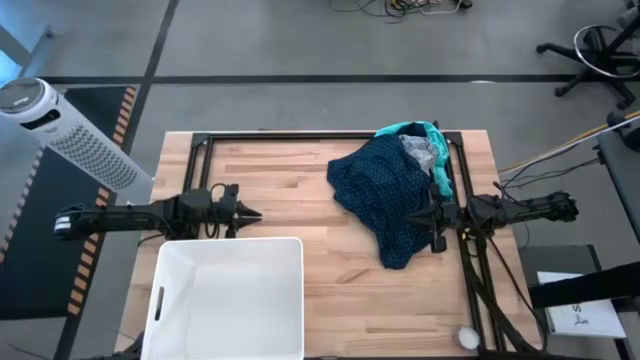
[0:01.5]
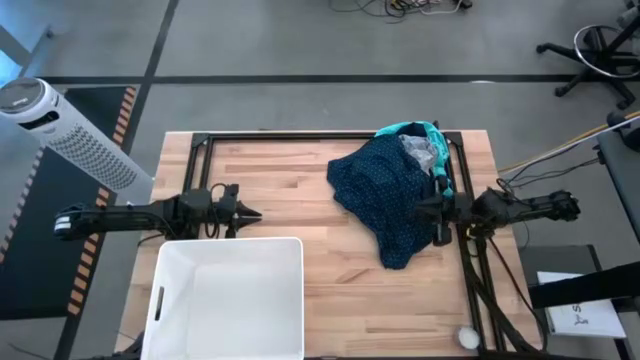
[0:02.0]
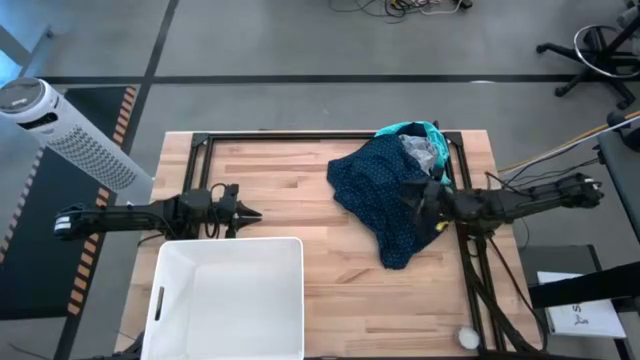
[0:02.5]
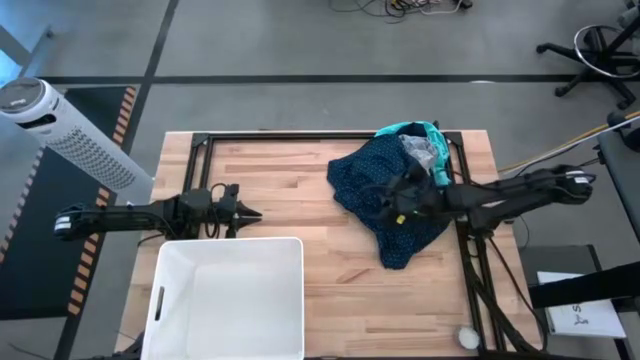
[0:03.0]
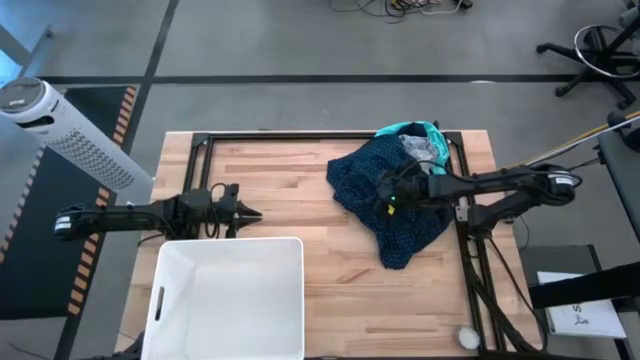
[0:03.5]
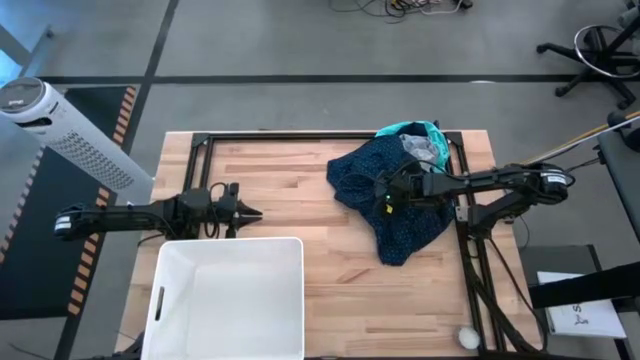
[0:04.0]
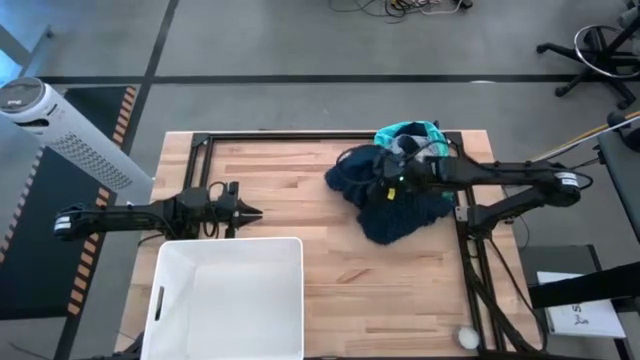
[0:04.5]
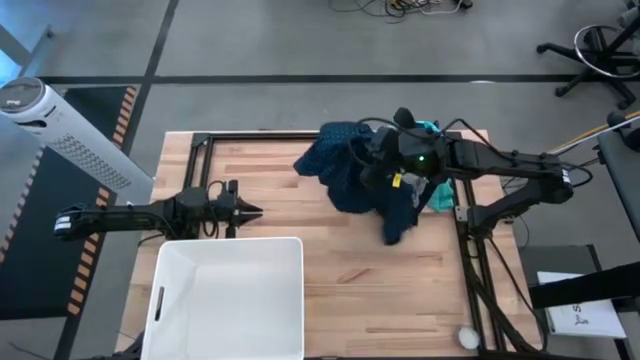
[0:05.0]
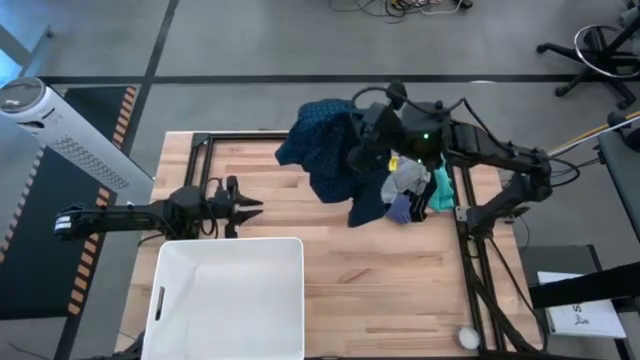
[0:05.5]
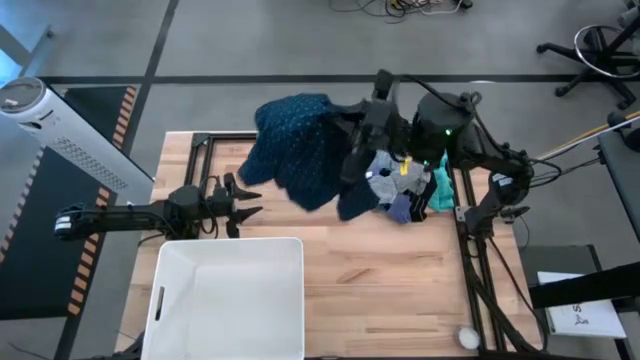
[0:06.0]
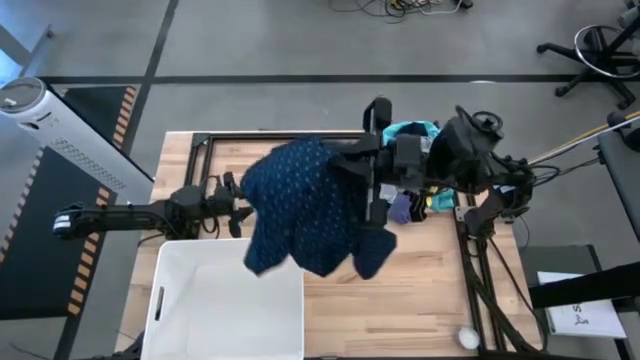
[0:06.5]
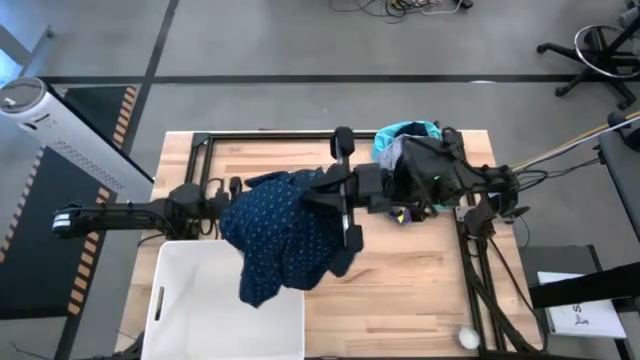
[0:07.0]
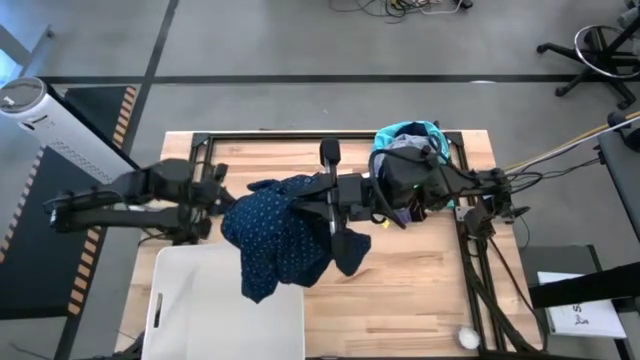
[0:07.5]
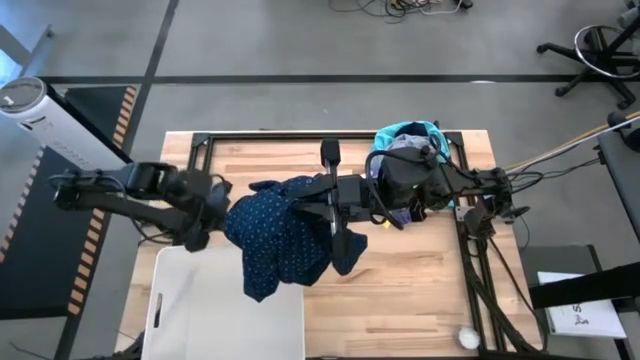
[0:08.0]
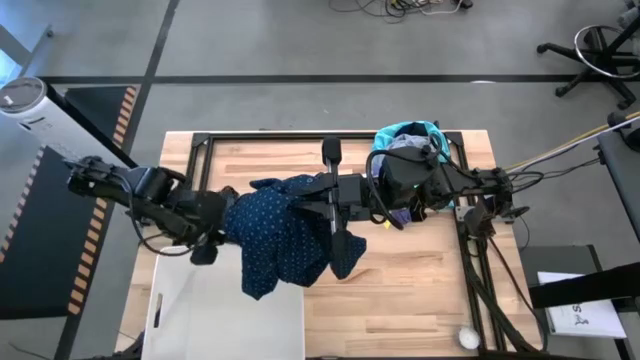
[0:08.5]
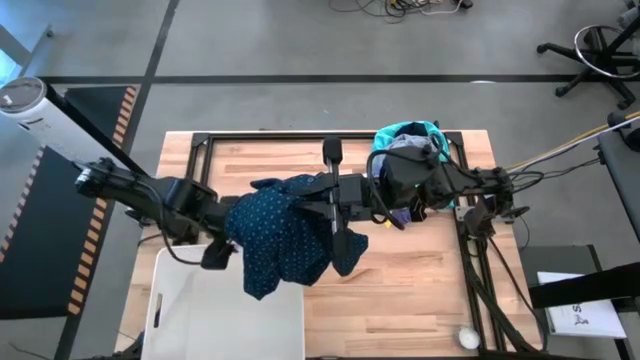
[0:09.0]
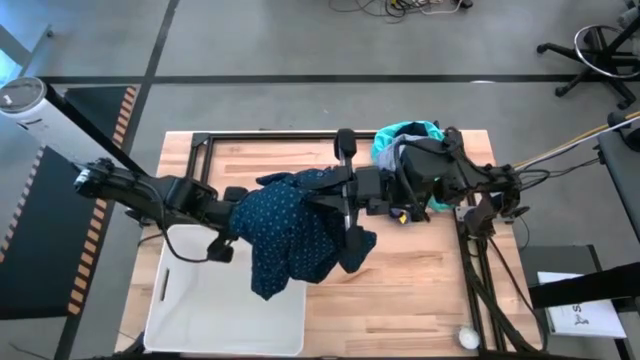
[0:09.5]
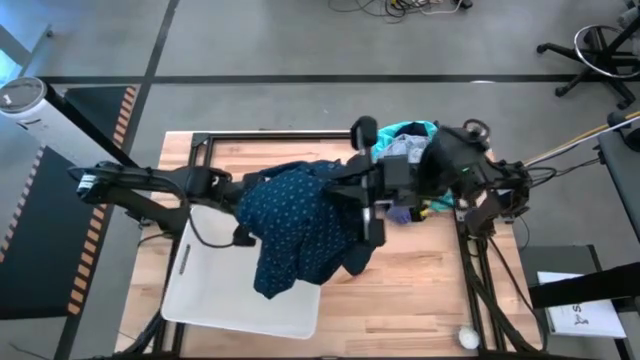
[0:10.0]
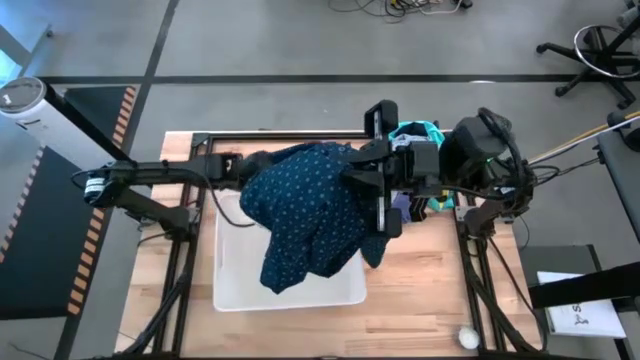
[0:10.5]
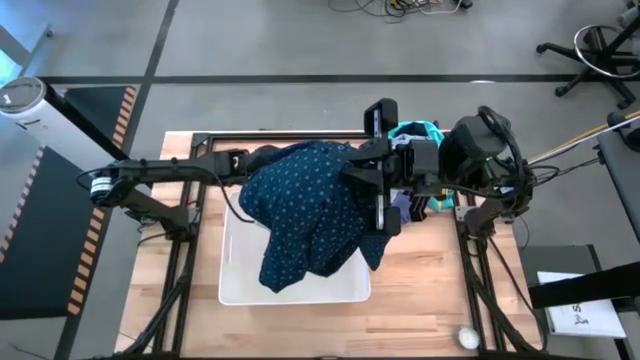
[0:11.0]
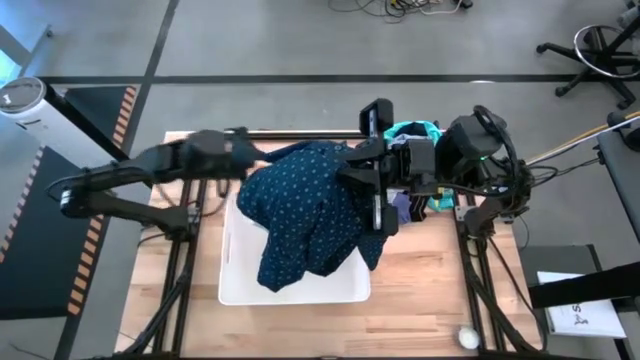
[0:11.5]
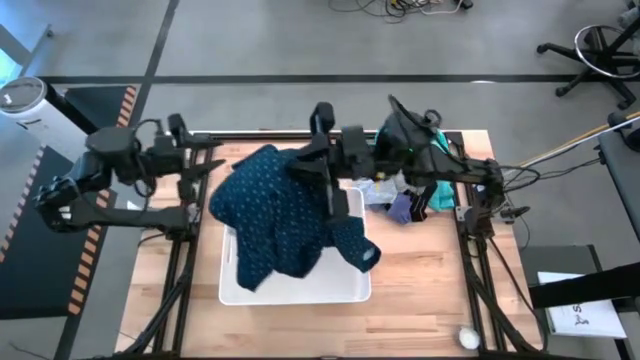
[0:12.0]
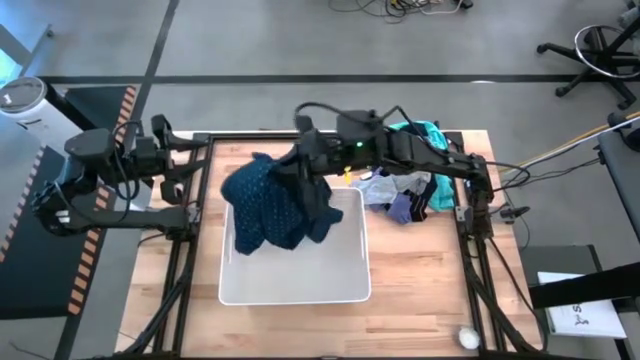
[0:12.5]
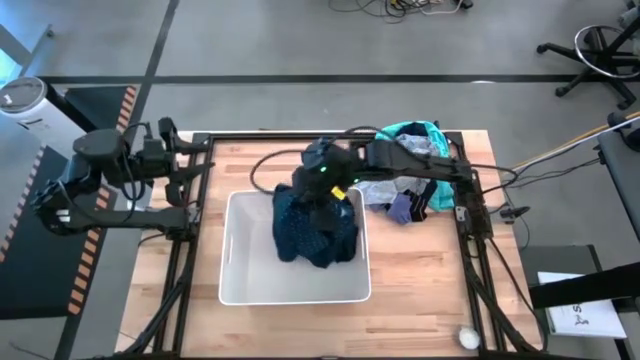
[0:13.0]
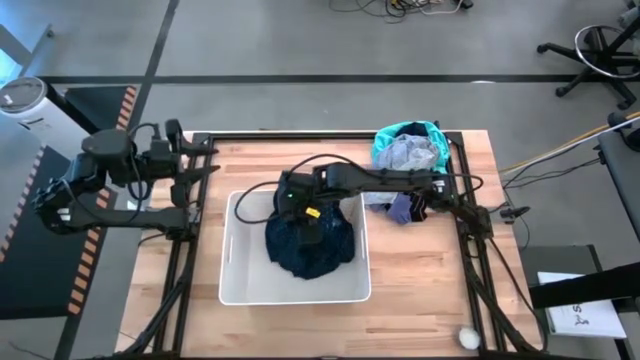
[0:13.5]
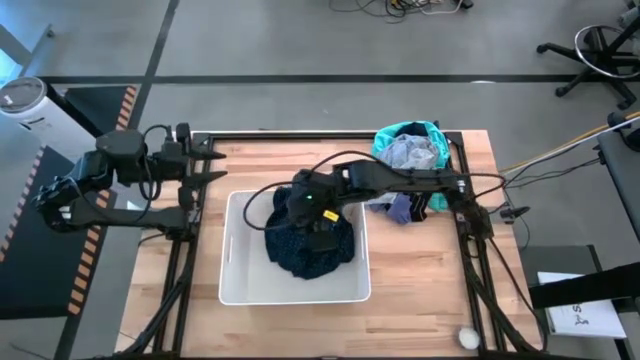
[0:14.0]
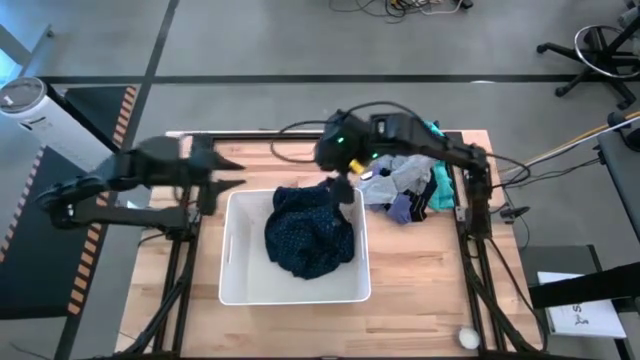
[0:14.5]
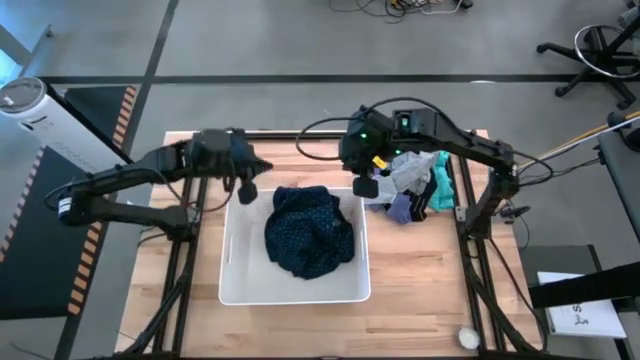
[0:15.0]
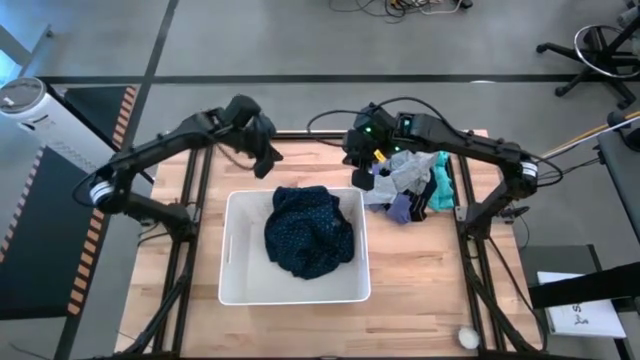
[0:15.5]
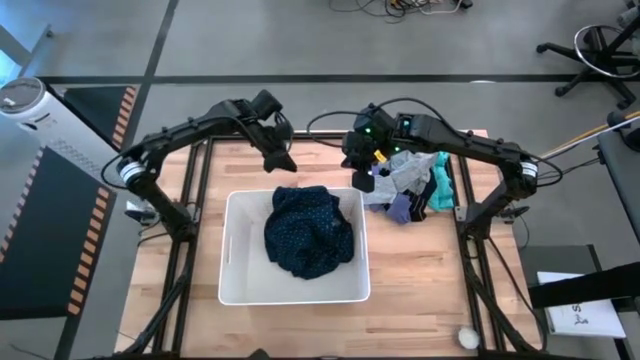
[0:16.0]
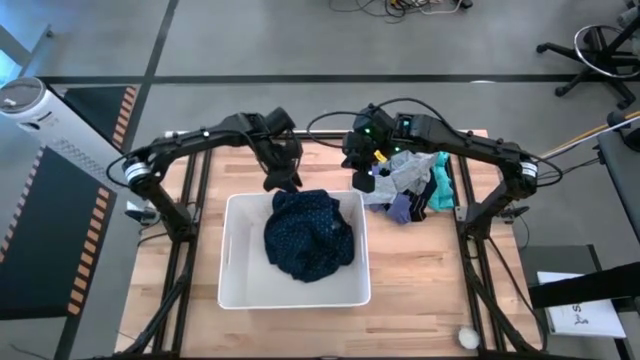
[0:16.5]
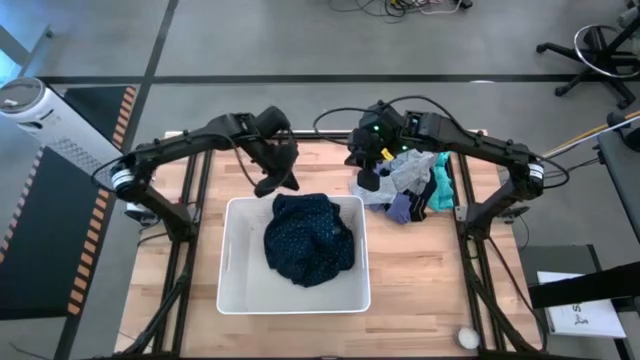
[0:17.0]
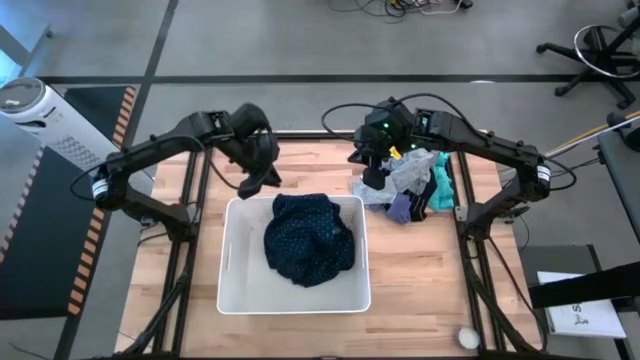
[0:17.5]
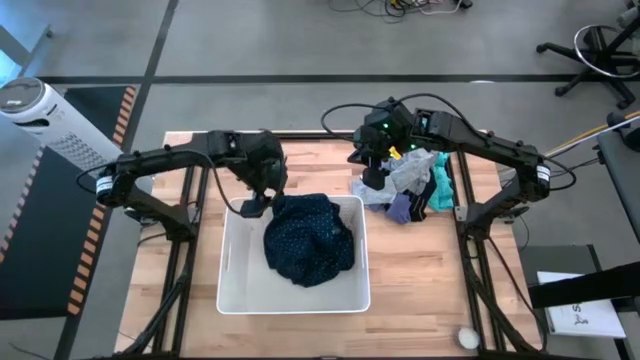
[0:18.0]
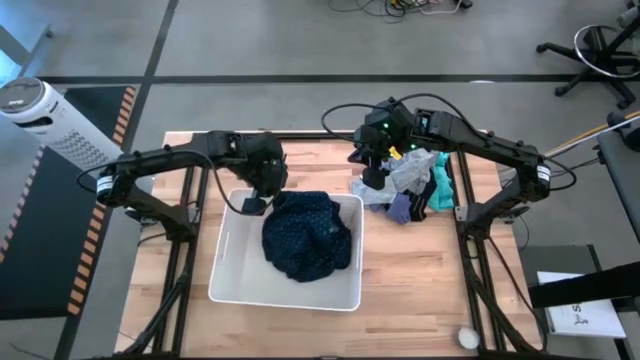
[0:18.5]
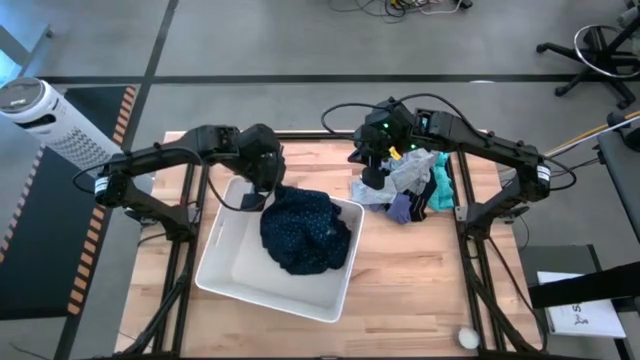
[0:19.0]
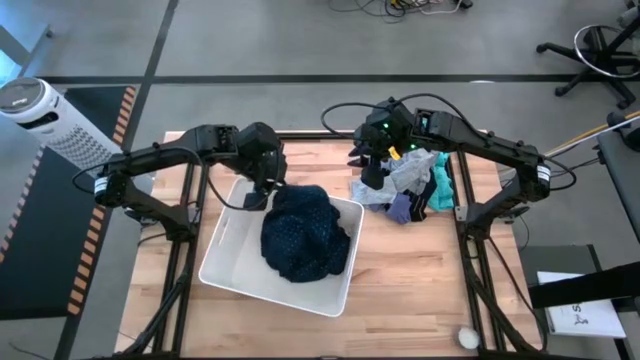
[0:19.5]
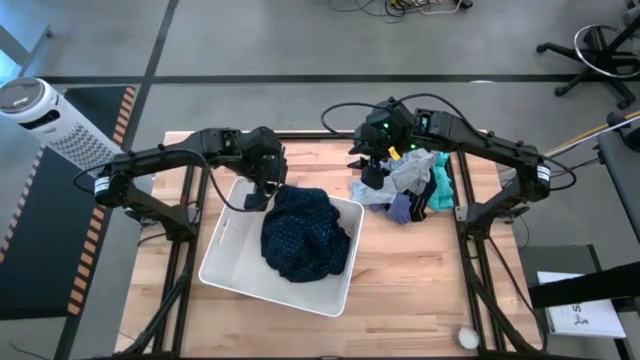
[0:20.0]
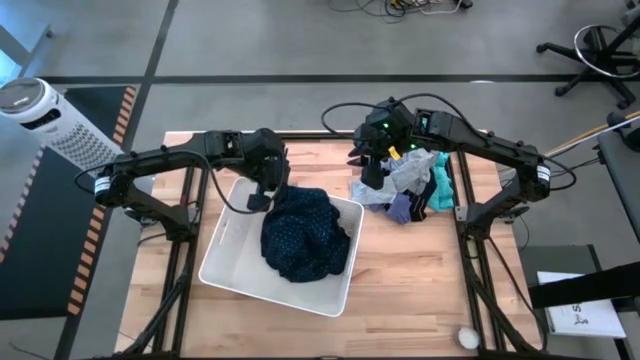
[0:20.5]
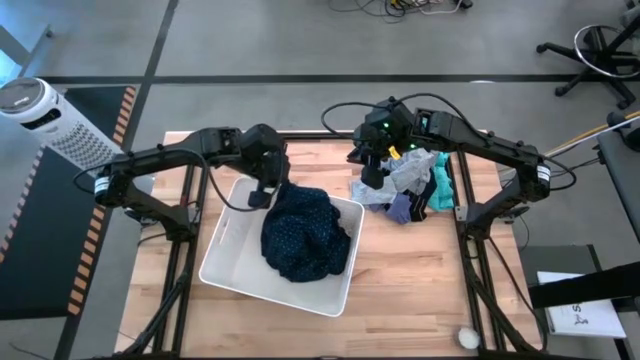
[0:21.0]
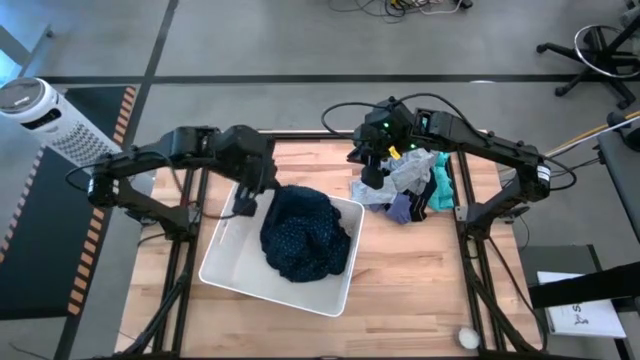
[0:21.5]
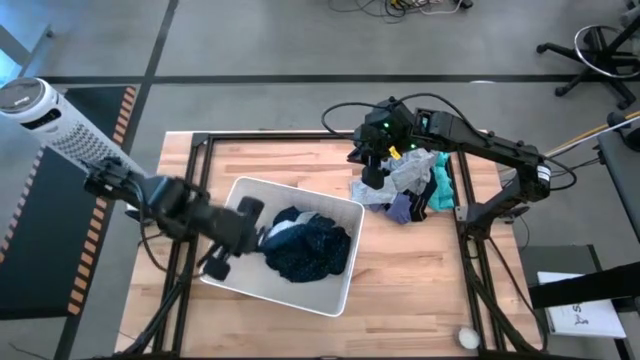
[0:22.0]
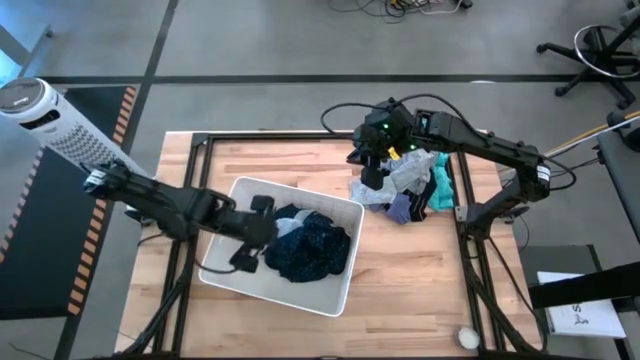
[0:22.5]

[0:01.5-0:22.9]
Task: Sort clothes
Put the dark blue polo shirt into the white laundry bin

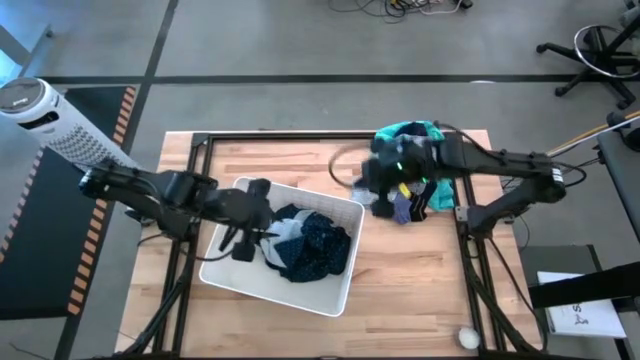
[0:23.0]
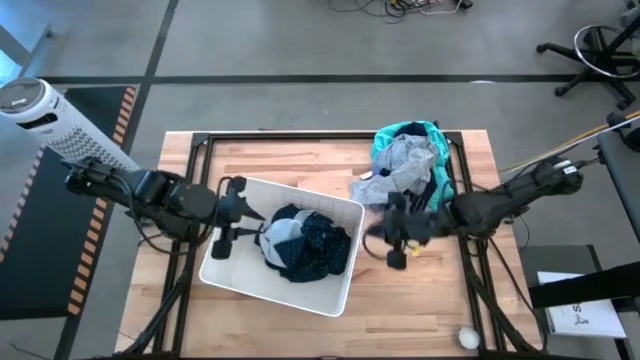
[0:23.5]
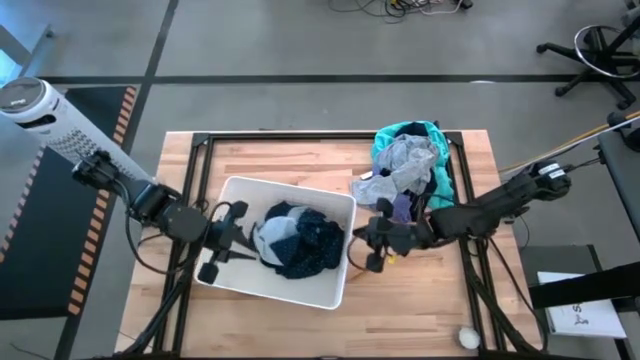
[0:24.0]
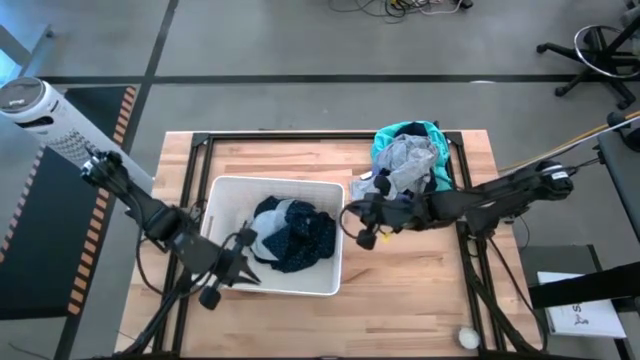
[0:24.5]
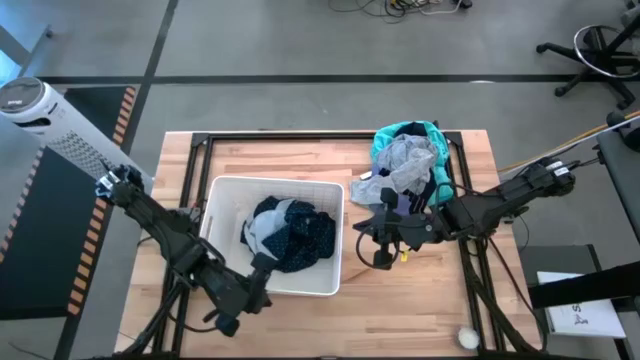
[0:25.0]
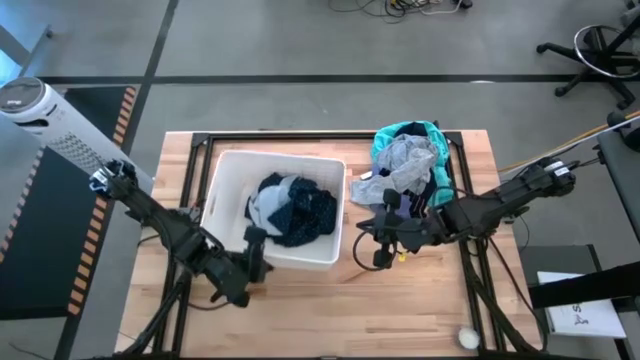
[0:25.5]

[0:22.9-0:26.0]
Move the white laundry bin to the center of the table
